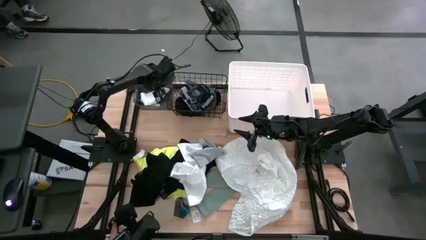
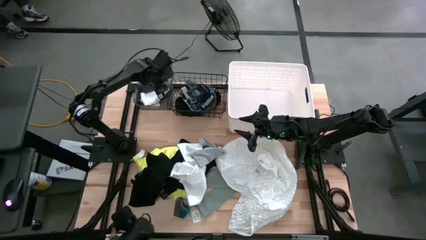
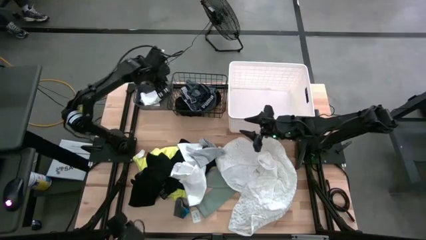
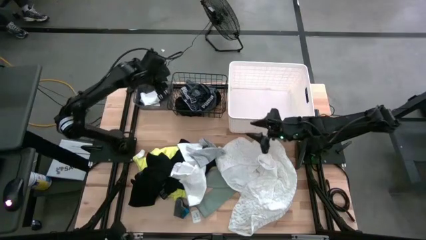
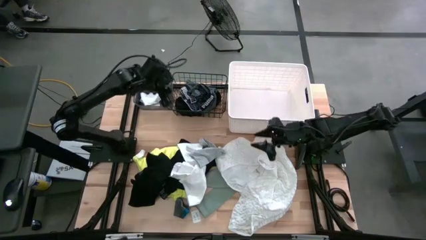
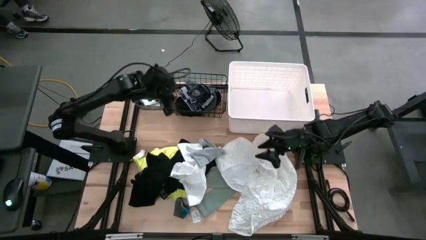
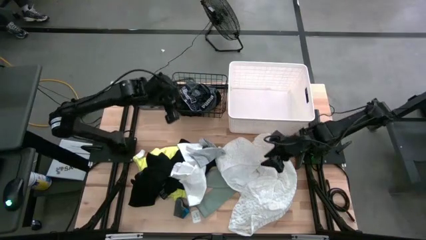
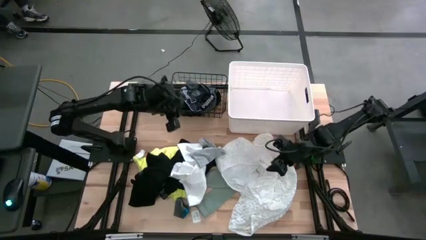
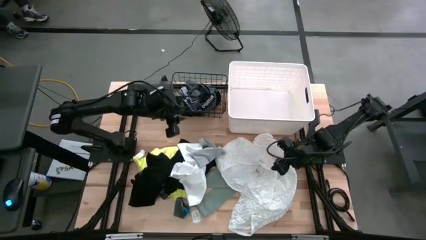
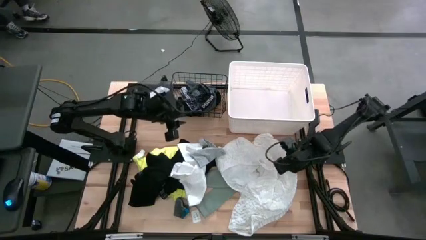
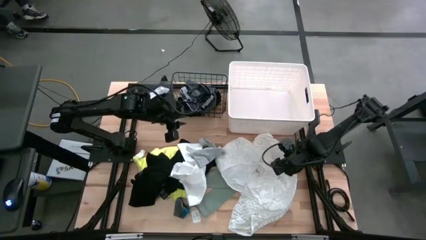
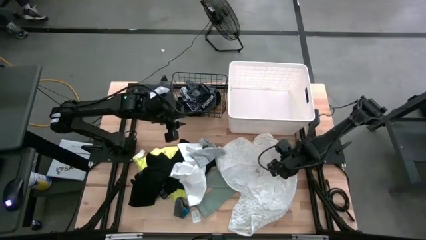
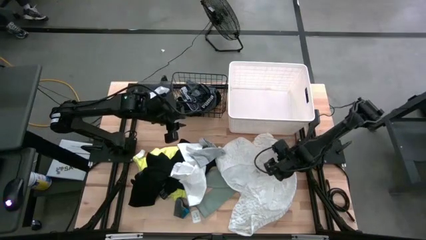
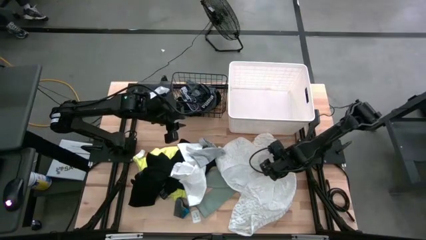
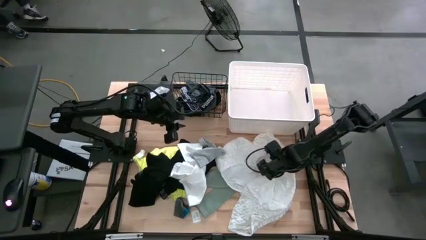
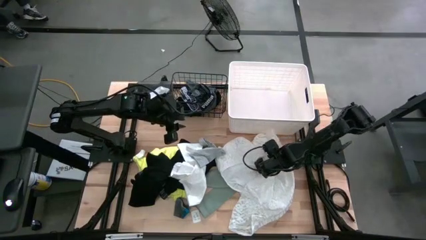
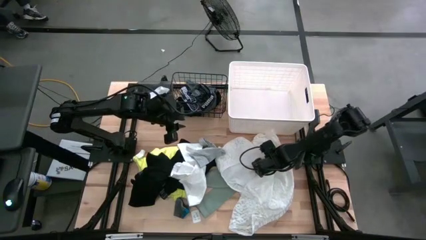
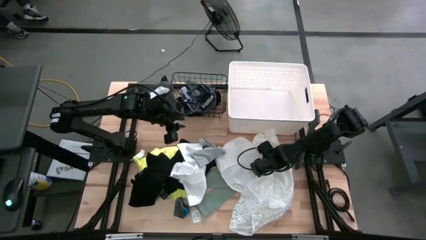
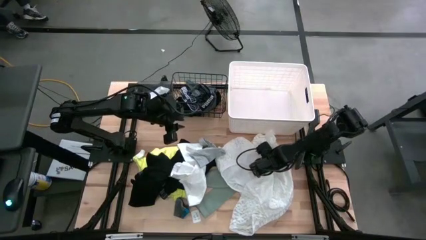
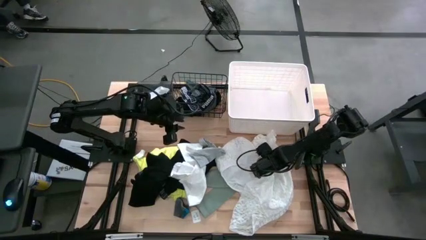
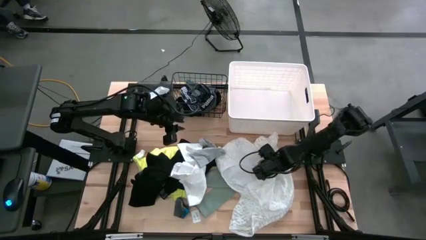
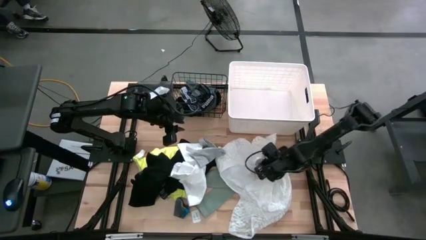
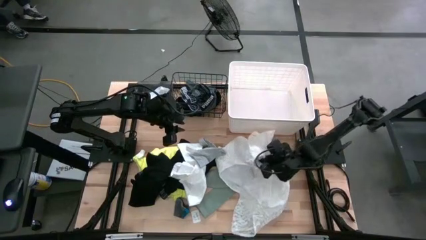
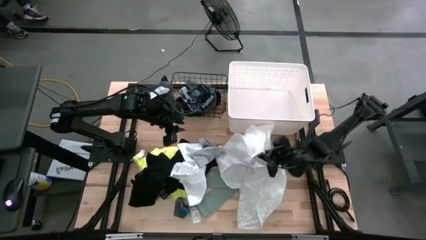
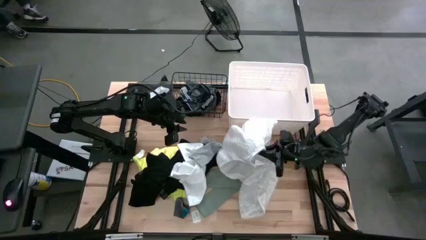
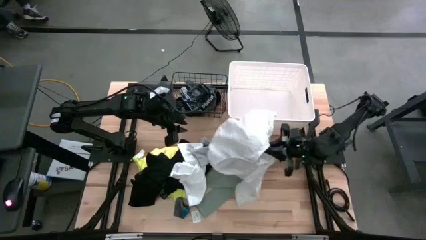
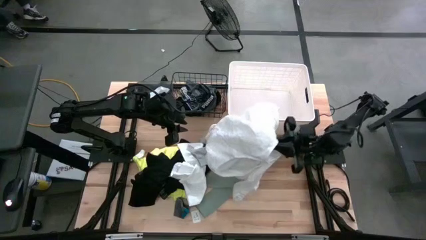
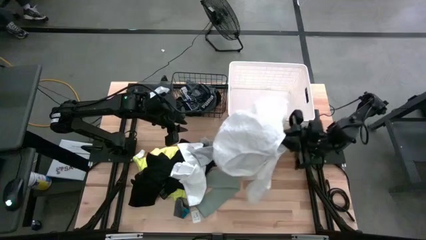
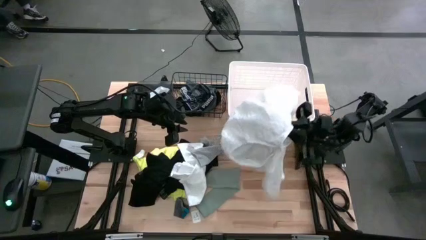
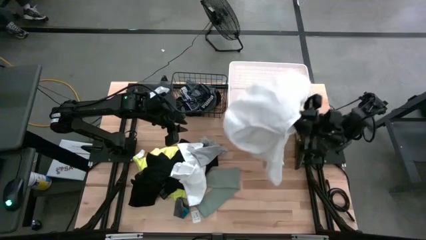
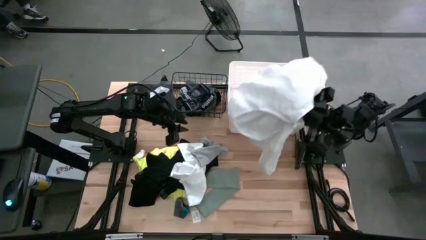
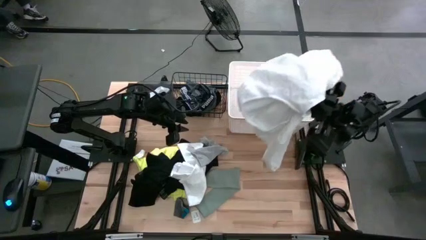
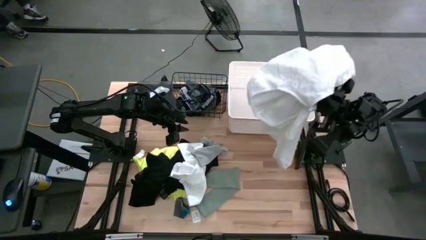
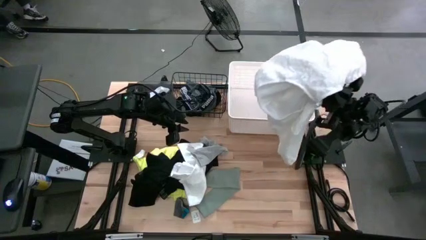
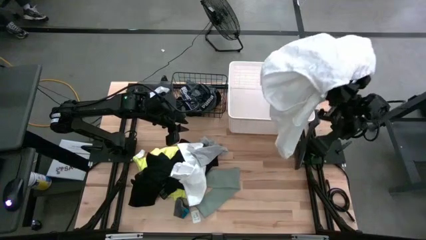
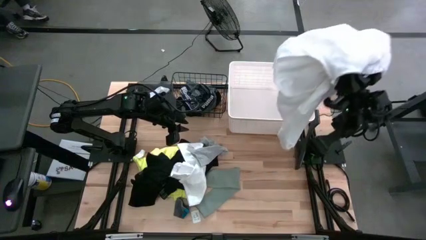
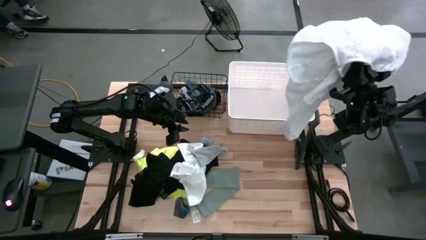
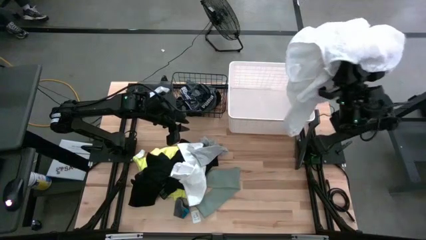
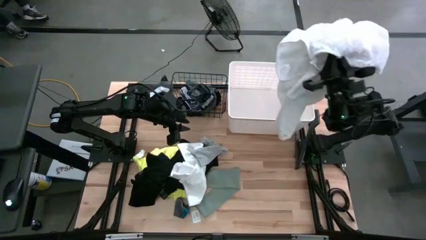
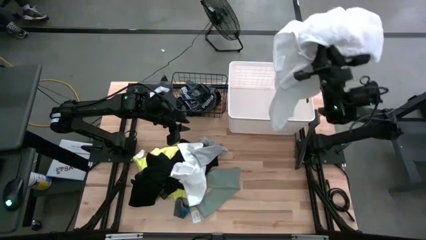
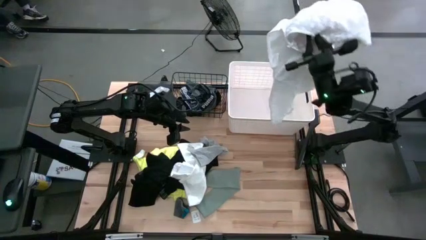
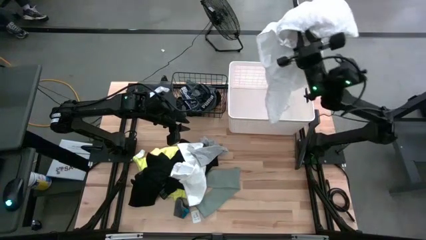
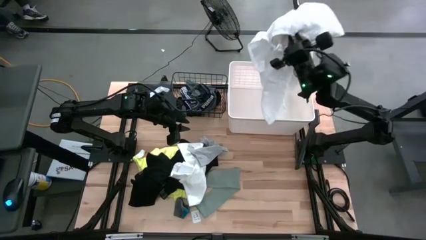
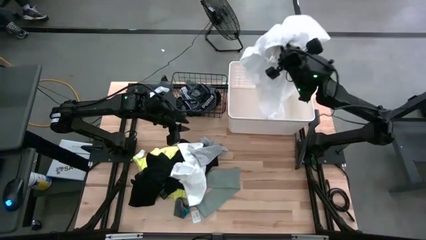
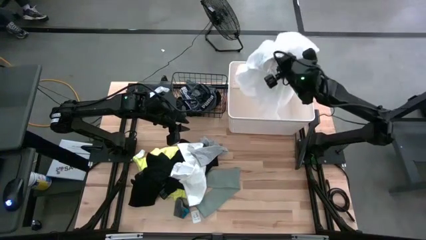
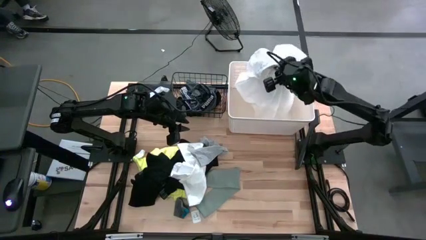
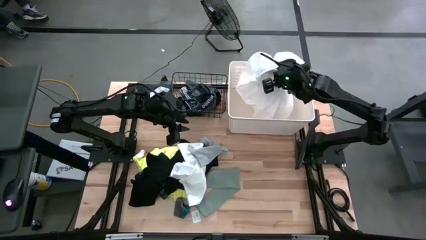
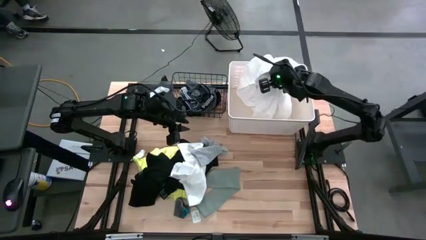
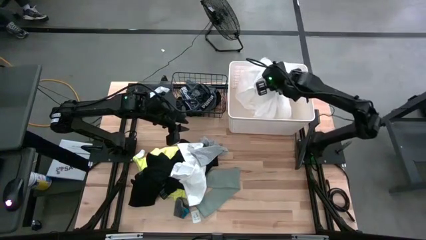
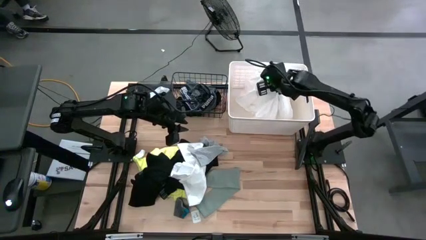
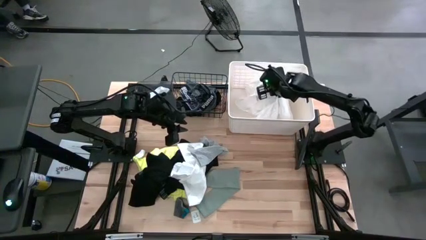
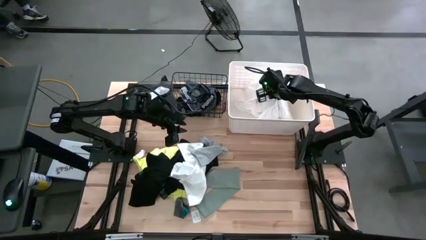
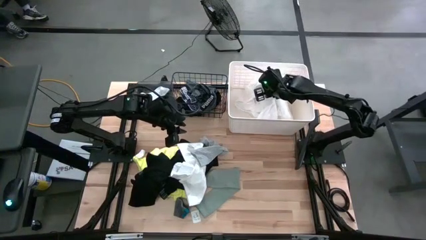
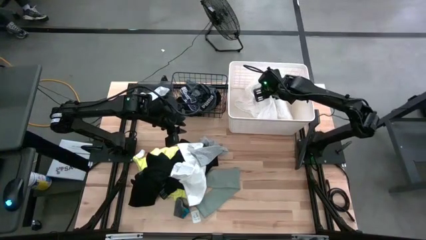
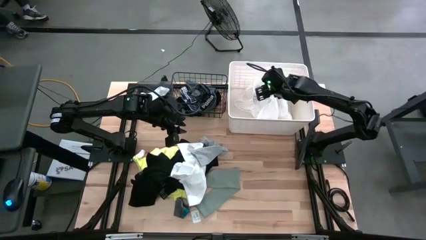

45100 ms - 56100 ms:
Task: Pick & Place Cloths
Put the white dress into the white laundry bin

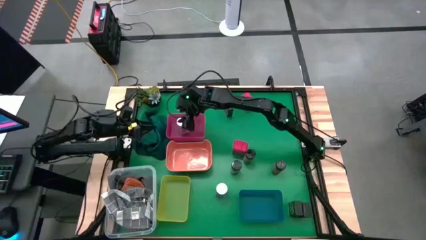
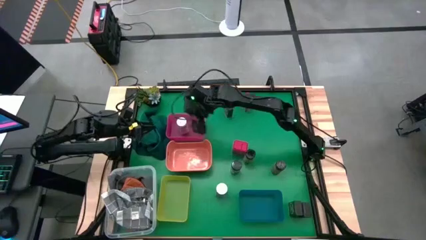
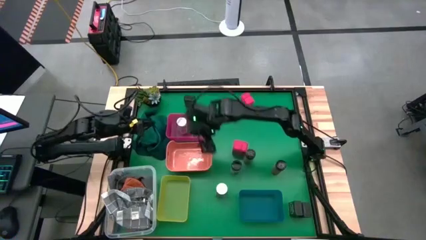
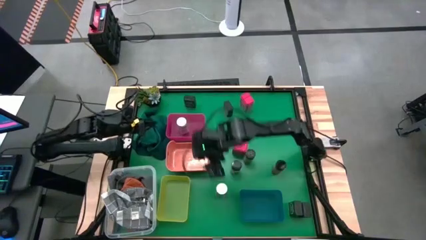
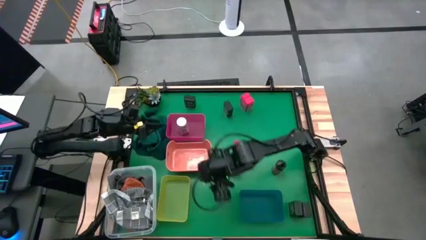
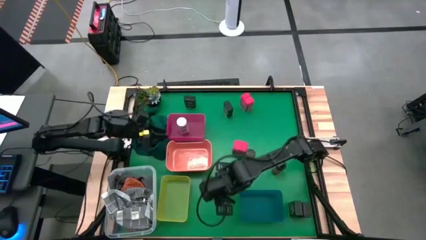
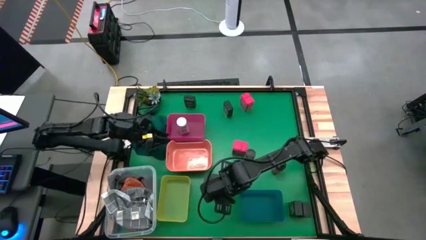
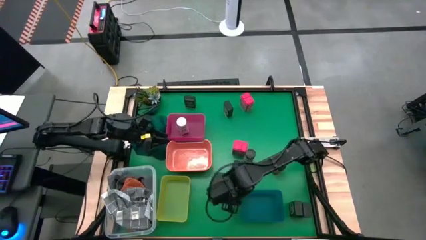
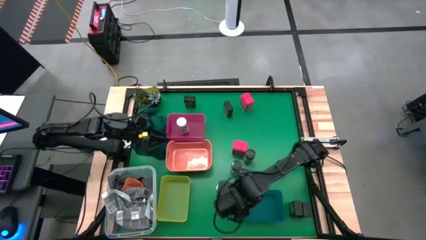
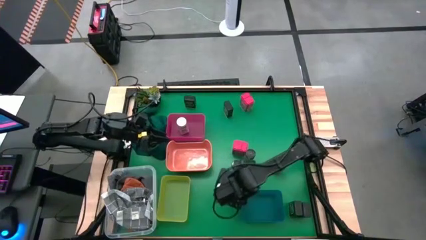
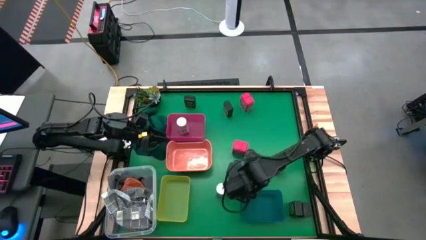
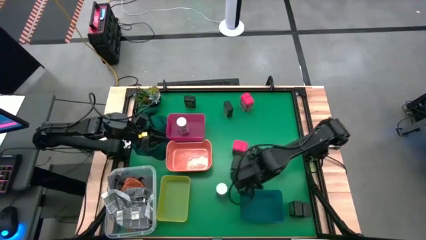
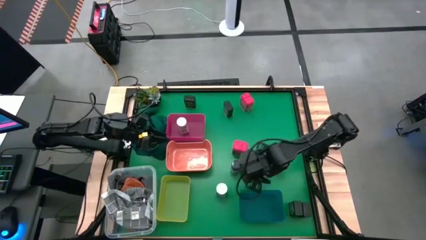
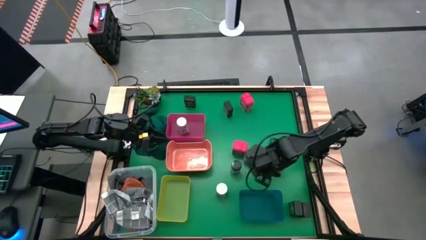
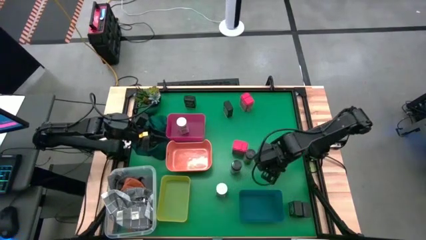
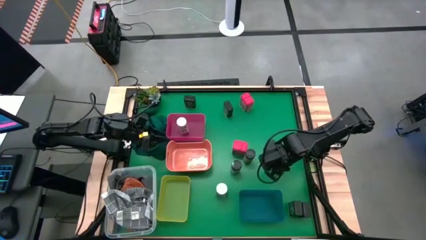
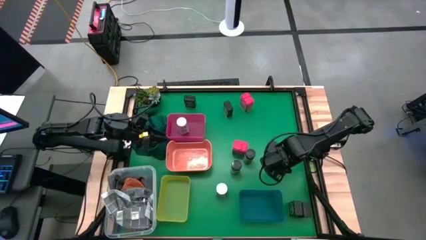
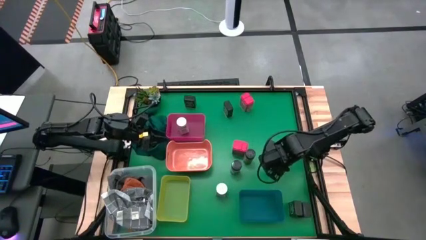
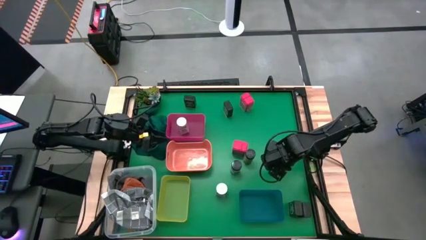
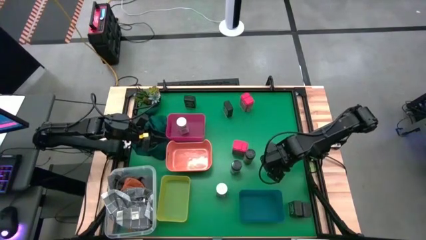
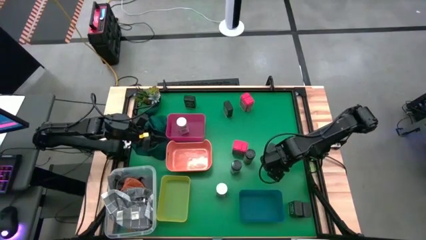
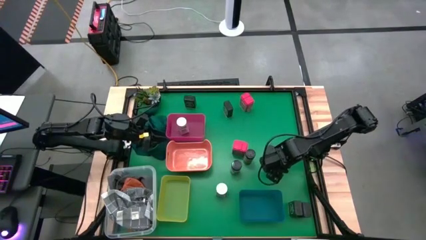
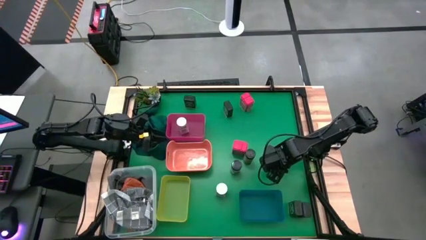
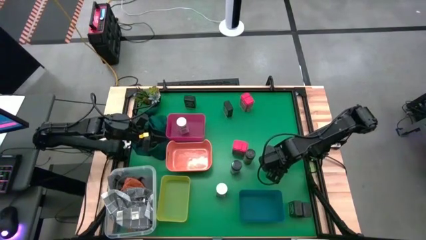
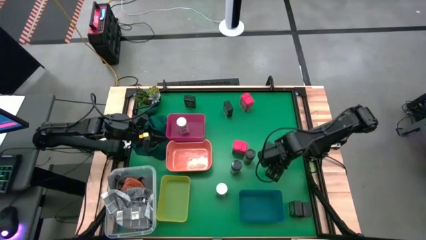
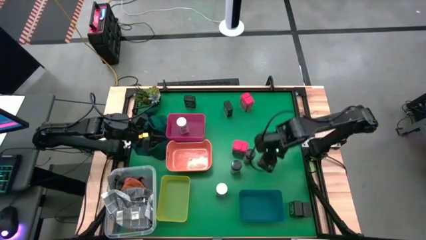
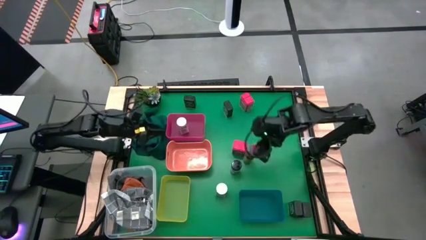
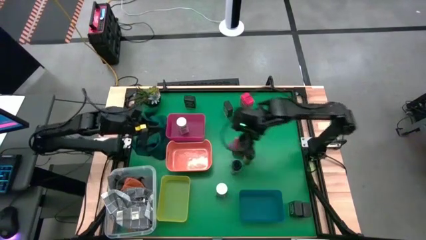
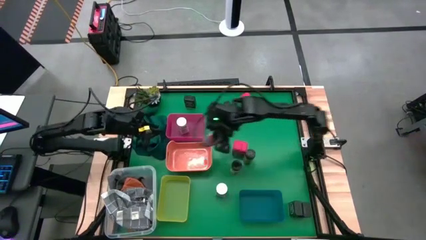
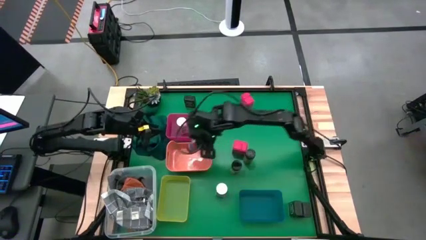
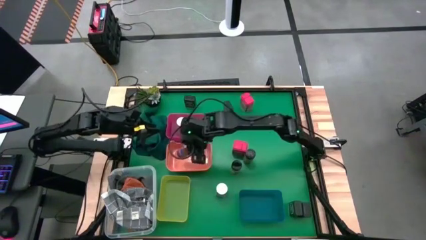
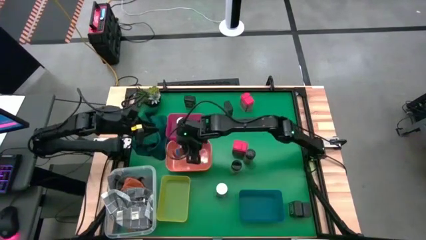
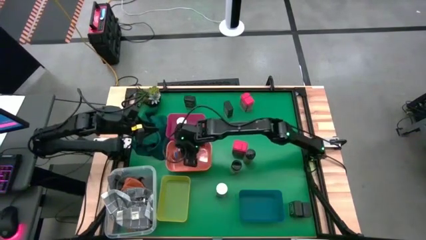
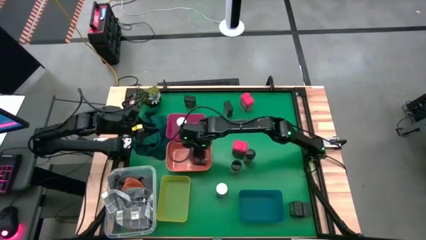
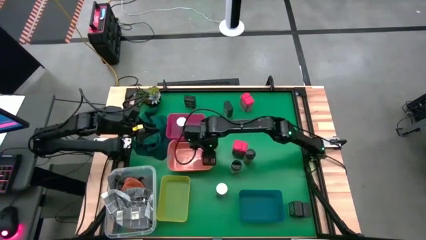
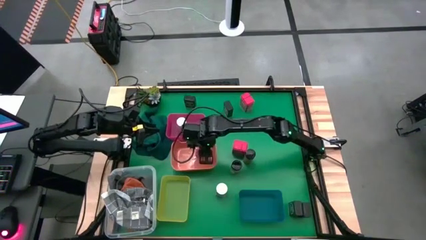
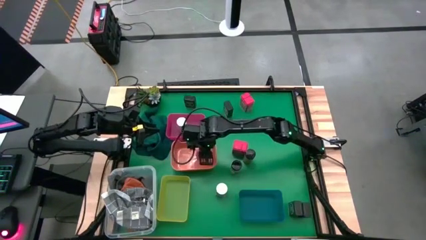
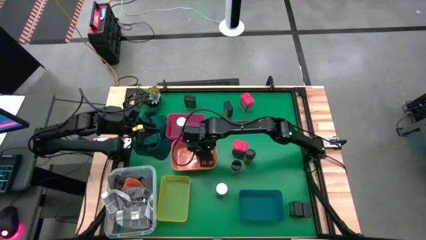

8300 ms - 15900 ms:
Task: Sort spices by type
Put the bottom right black seasoning bottle into the orange bin
